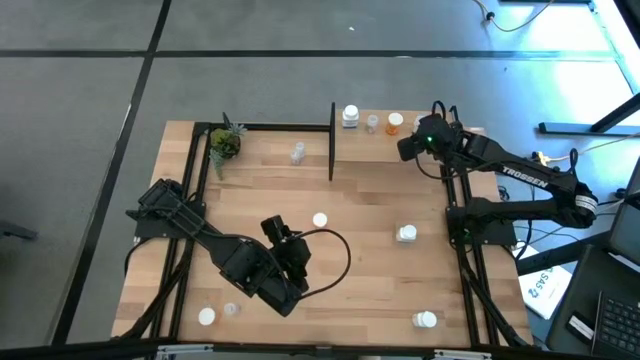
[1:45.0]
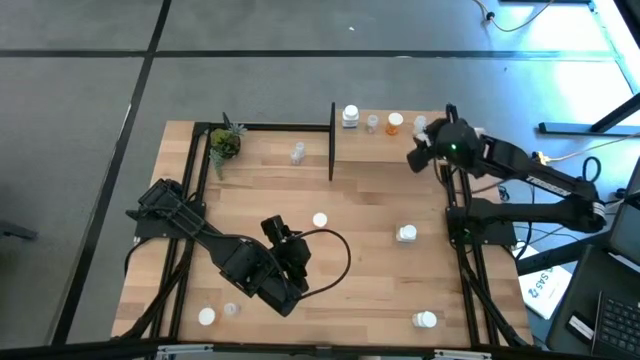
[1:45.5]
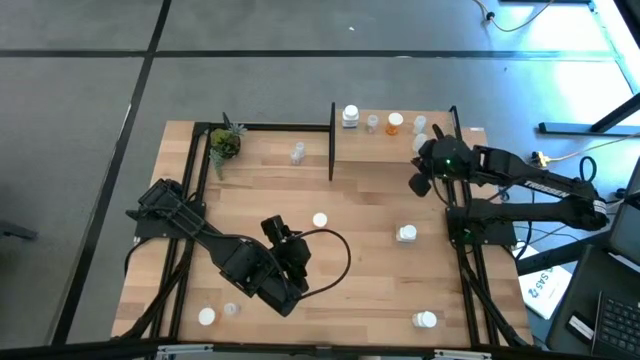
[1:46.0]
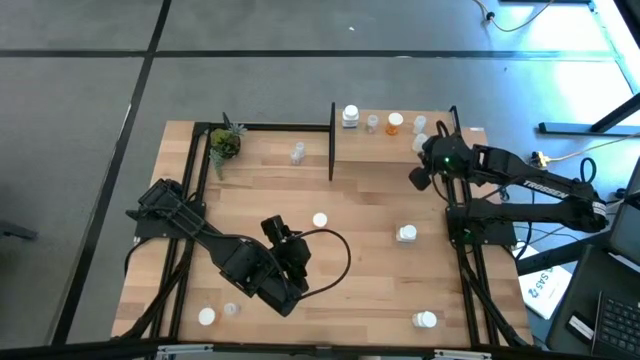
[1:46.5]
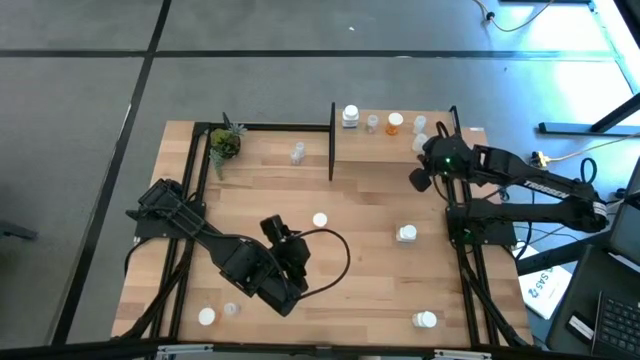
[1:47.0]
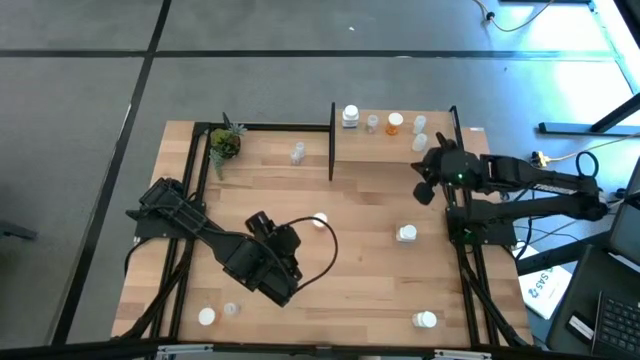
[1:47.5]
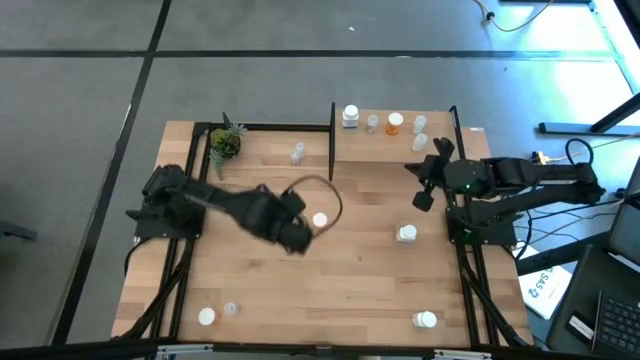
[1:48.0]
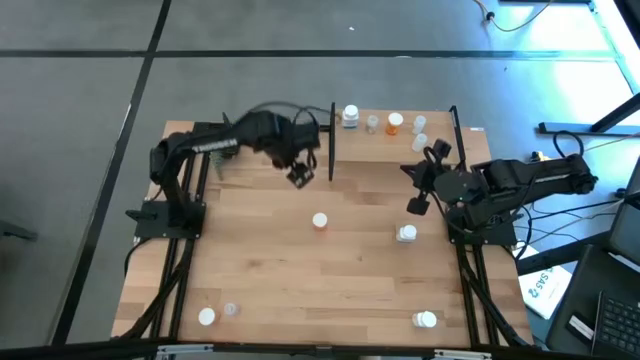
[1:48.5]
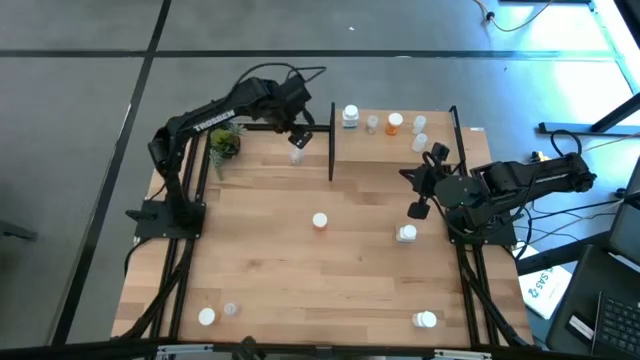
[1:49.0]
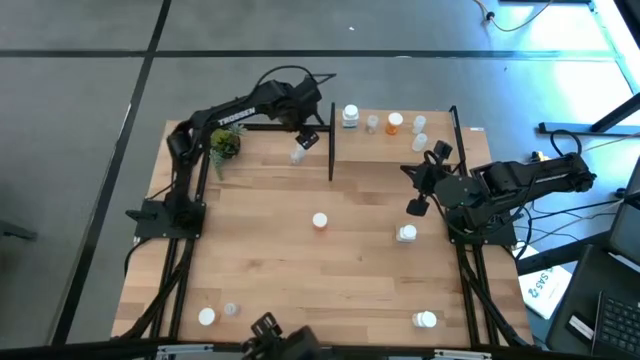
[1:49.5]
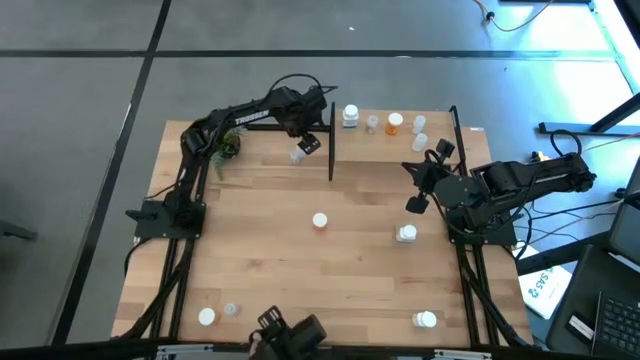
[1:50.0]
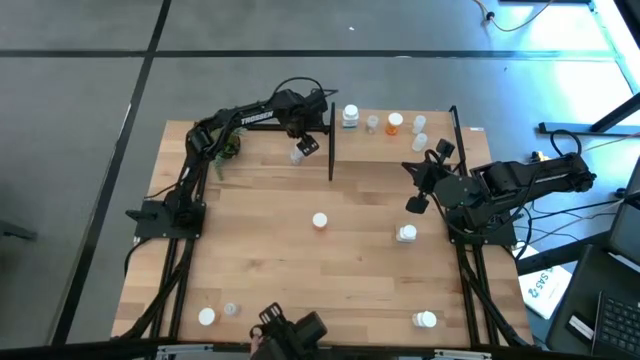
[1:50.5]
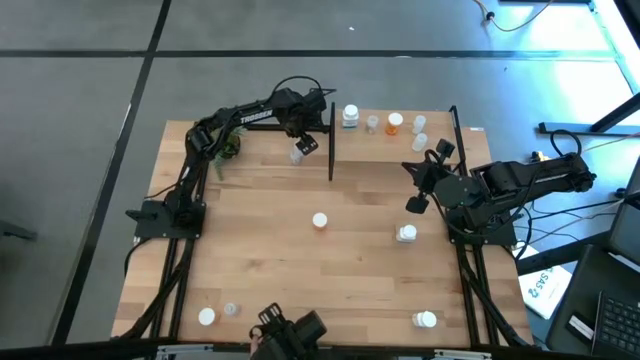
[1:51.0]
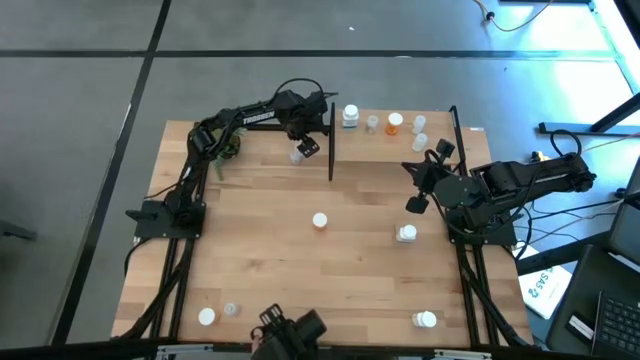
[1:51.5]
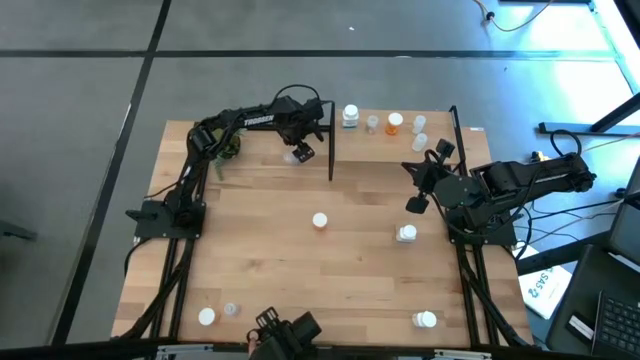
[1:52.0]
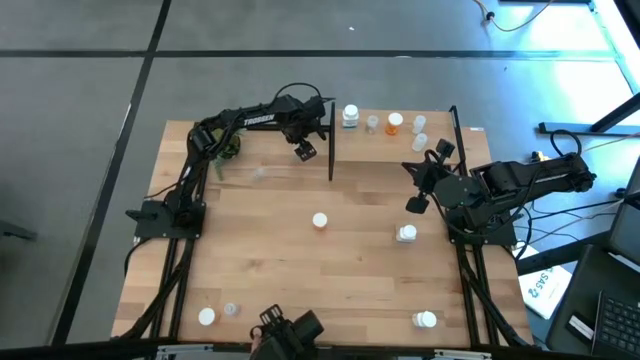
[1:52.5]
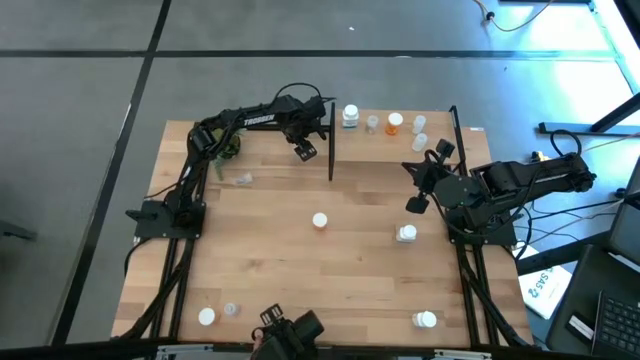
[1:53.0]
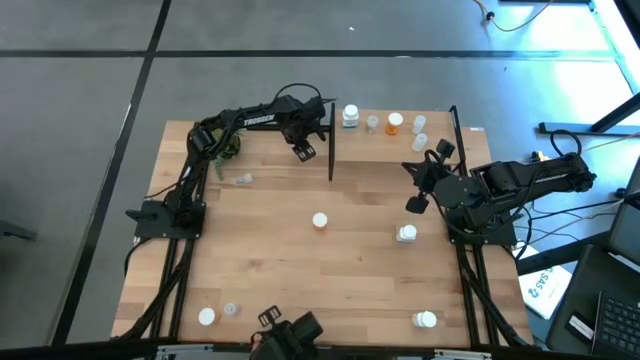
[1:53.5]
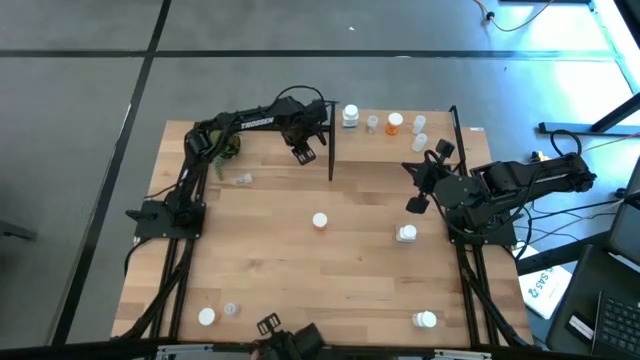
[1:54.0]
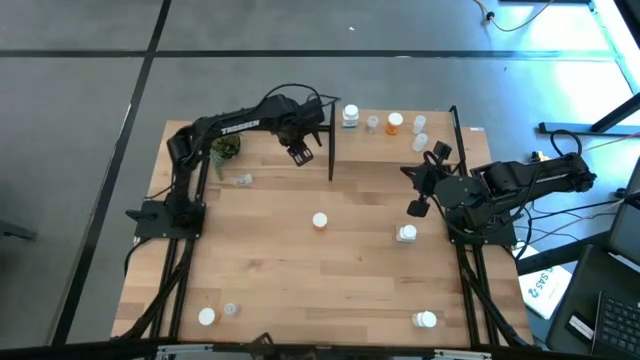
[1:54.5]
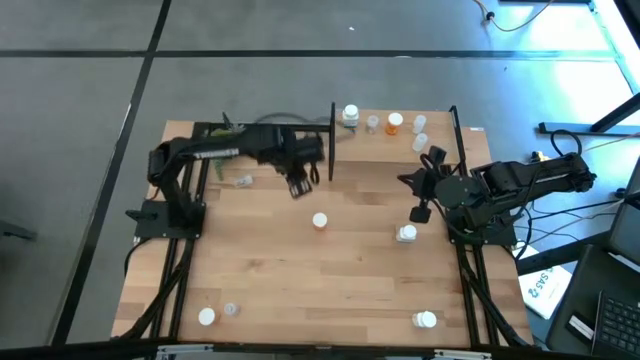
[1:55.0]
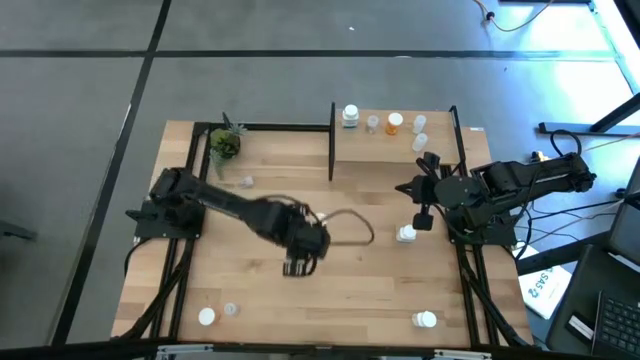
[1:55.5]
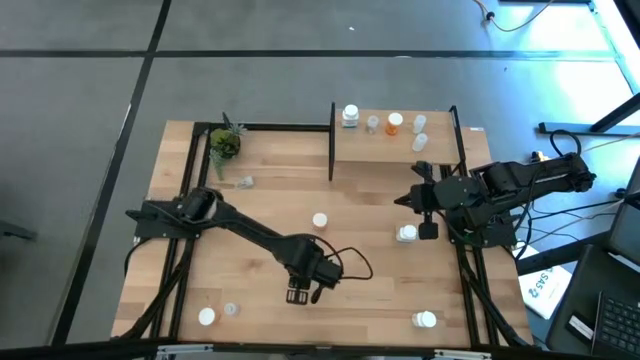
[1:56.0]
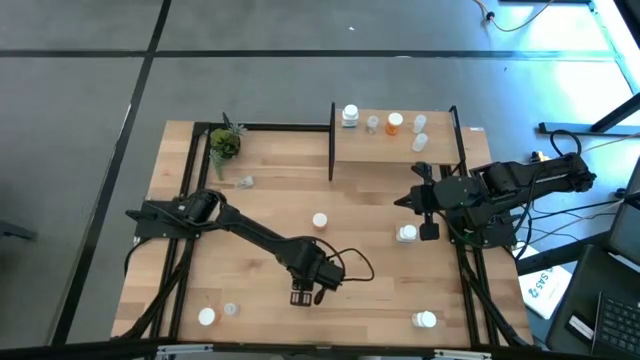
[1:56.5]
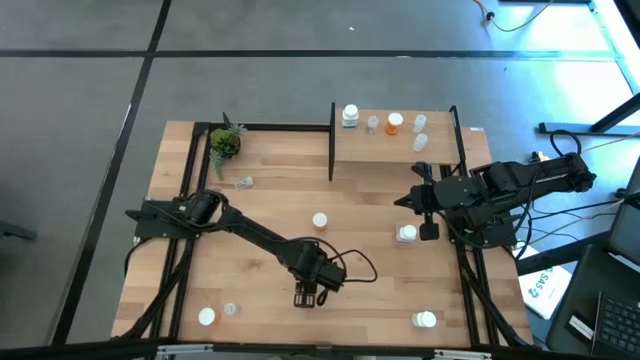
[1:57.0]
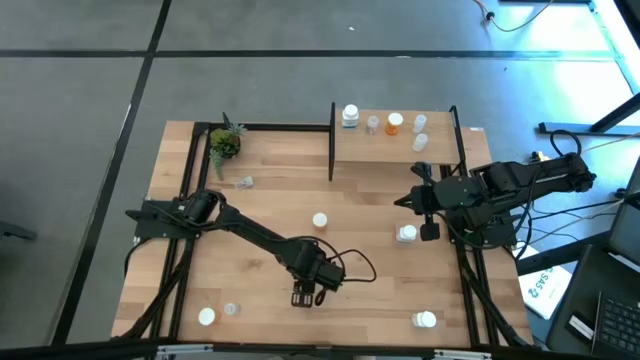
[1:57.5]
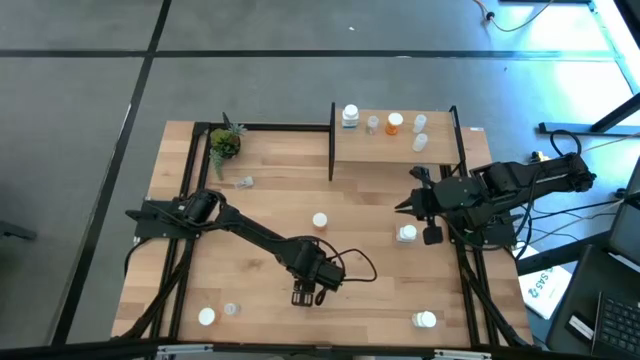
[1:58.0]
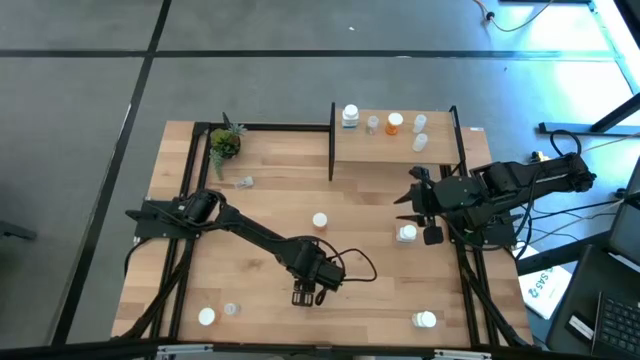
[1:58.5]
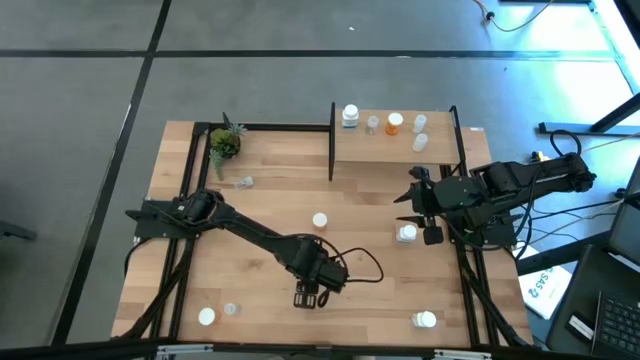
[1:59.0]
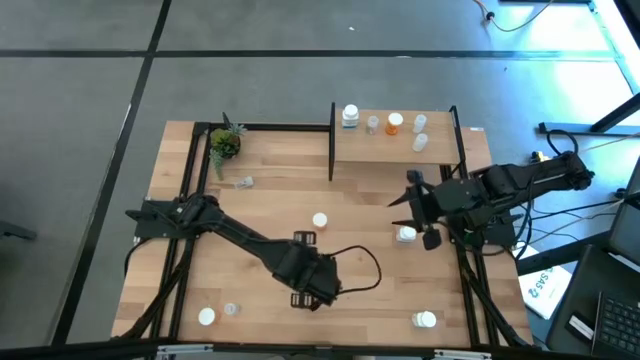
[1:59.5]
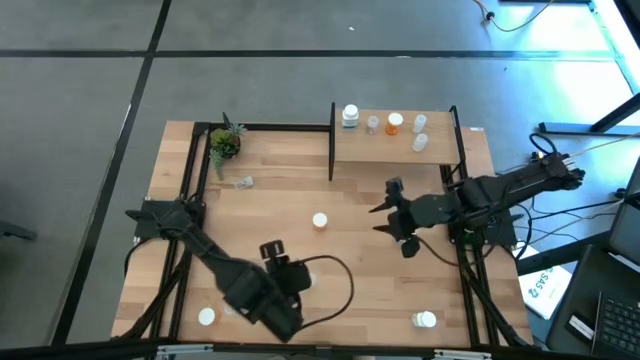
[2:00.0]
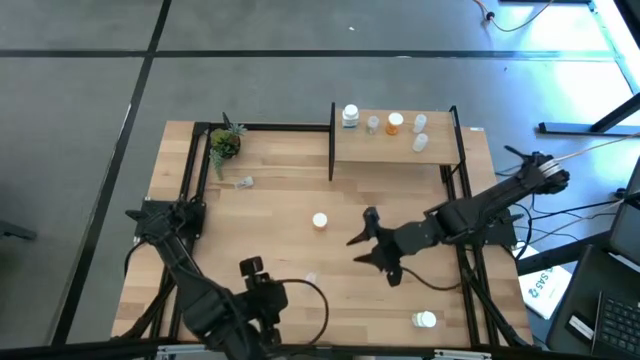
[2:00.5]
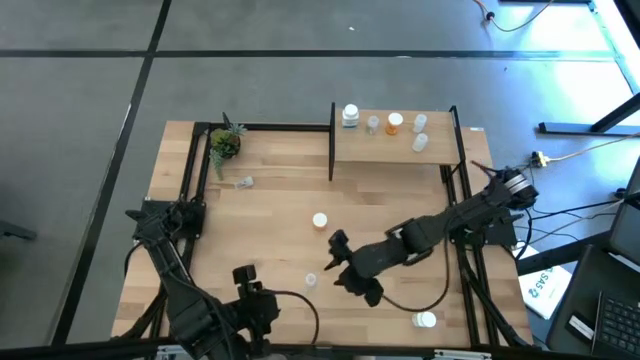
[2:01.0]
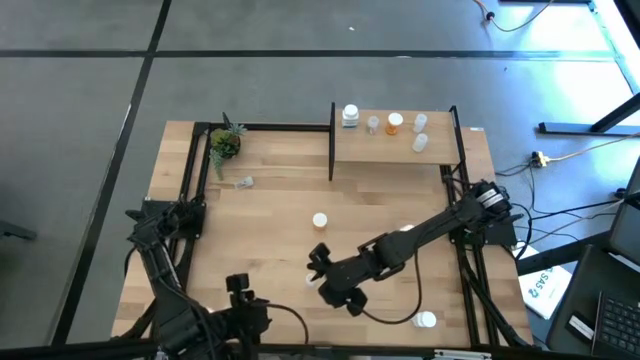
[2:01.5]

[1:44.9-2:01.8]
Task: Pick and place medicine bottles onto shelf by color
Put the yellow transparent pill bottle on the shelf aligned with the other yellow transparent pill bottle

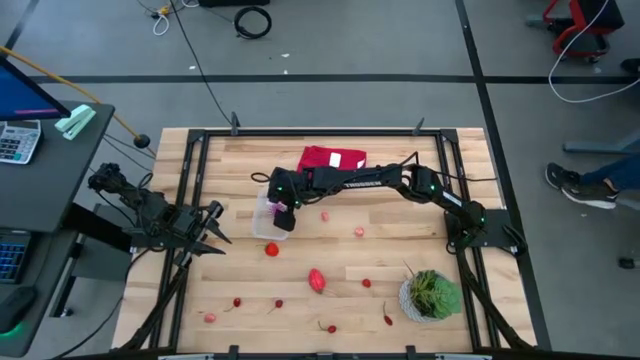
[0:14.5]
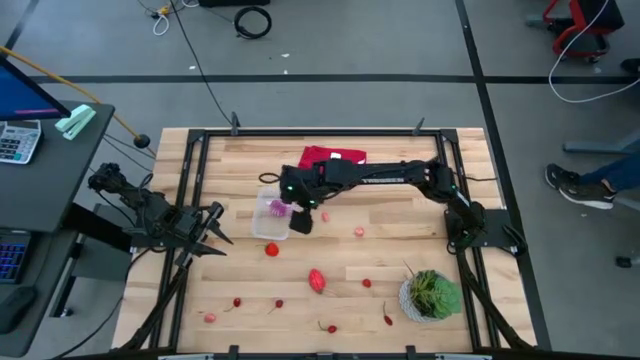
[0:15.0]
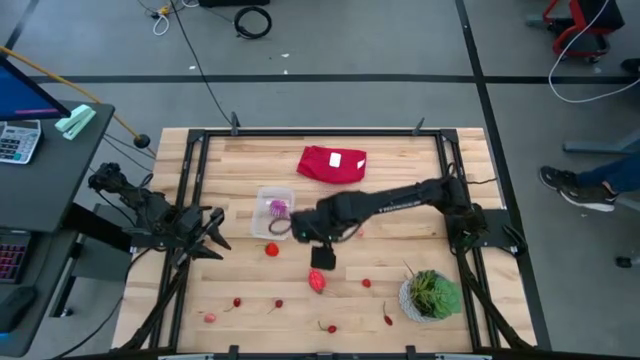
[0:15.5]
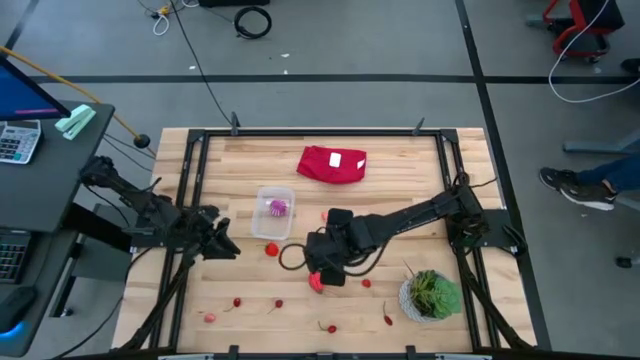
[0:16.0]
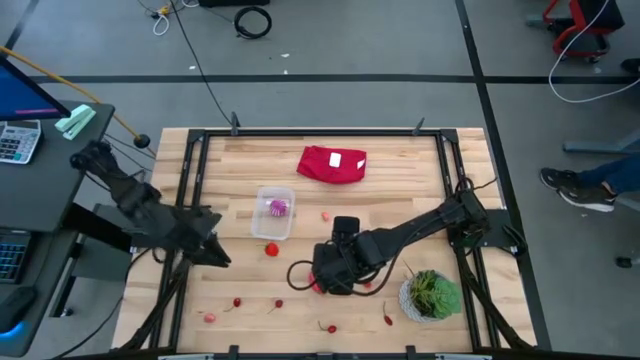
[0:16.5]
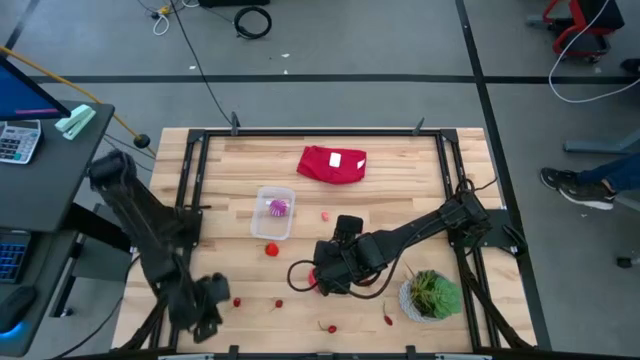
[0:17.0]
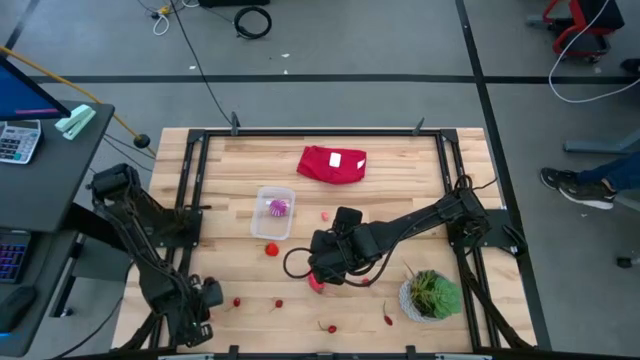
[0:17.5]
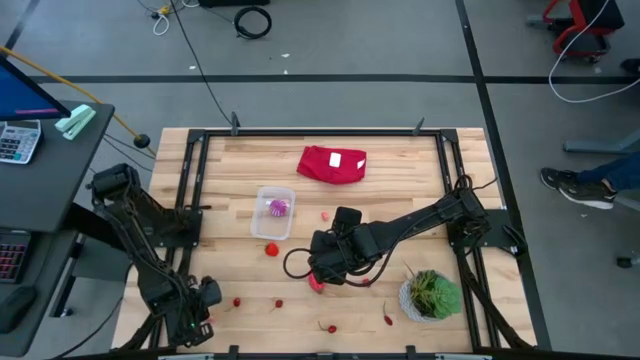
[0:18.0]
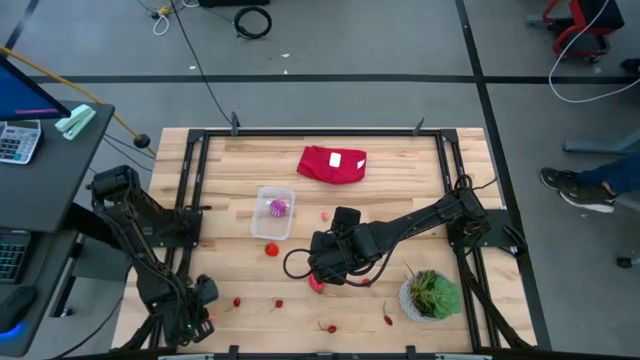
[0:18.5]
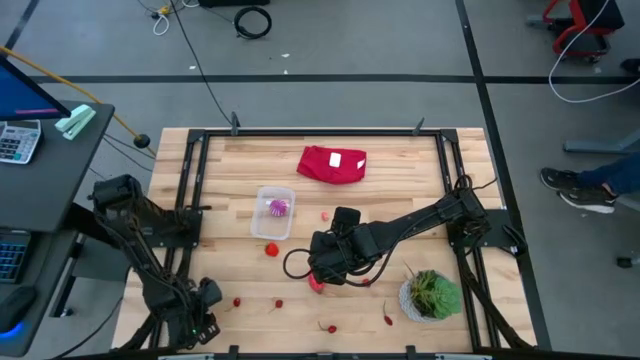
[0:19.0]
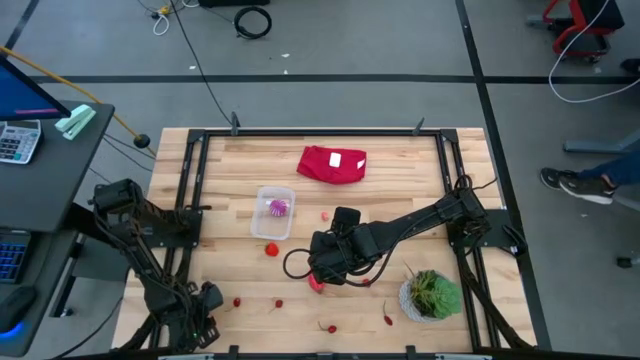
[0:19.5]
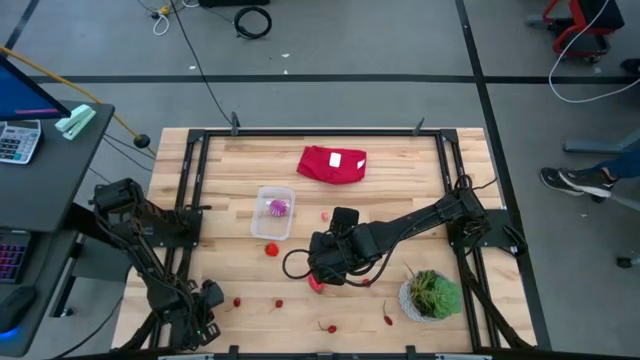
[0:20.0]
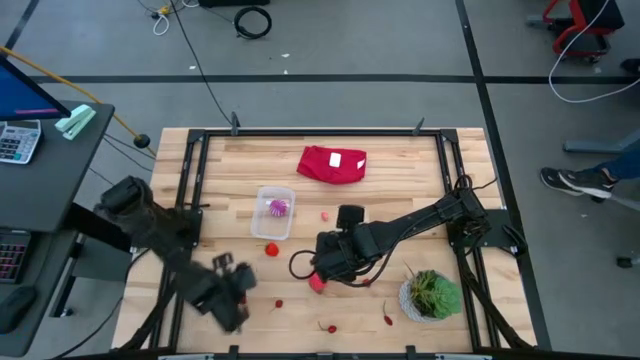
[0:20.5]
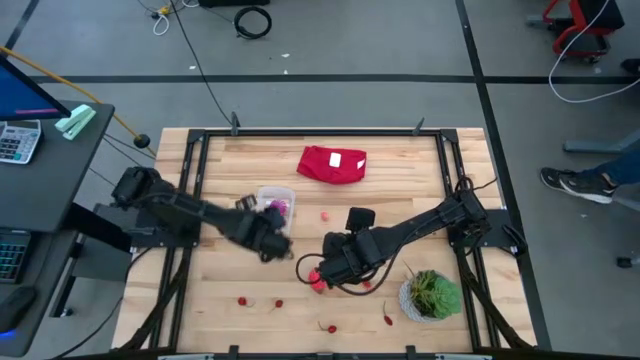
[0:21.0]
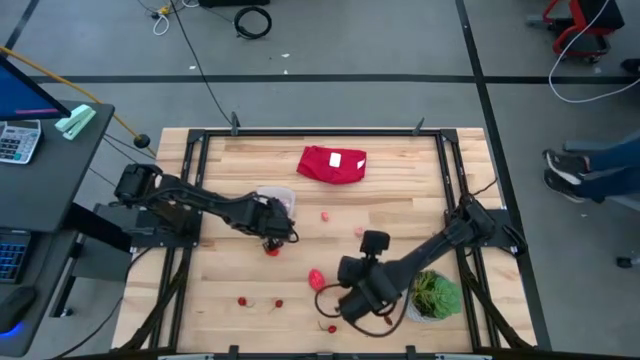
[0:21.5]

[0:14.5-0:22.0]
Task: Pick and placing Produce into tupperware
Put the bottom pink peach in the transparent bin
